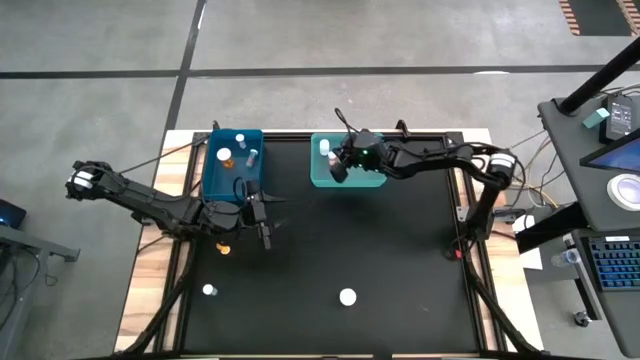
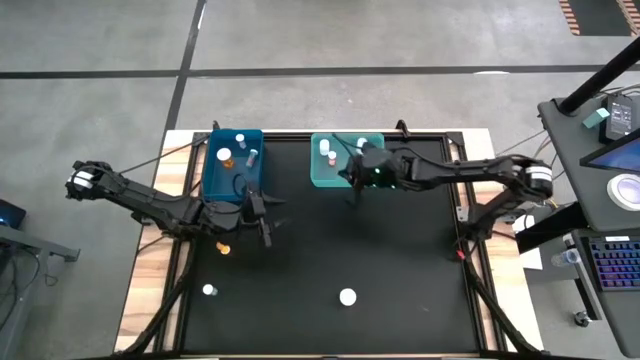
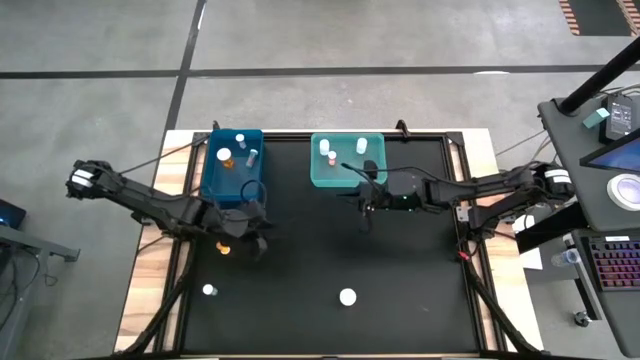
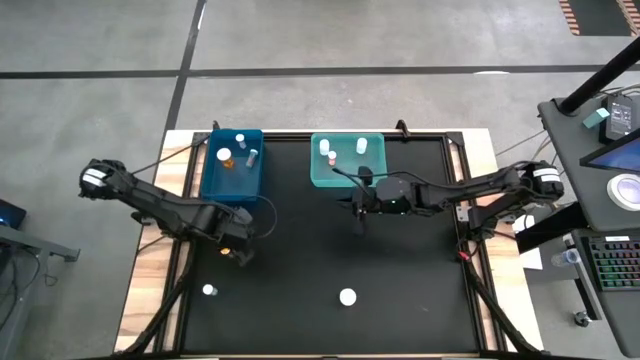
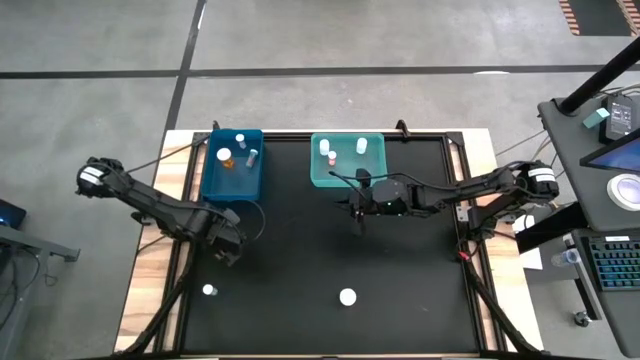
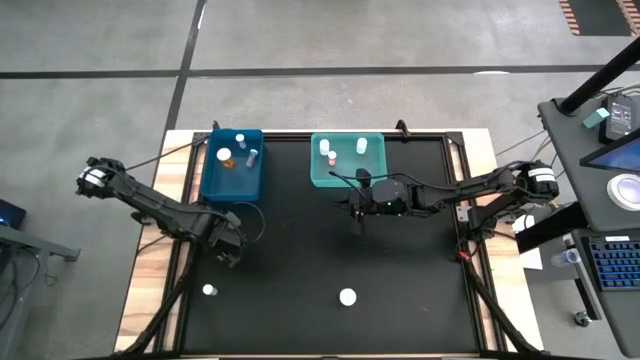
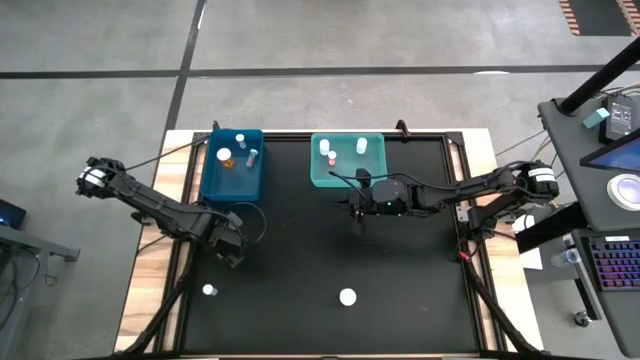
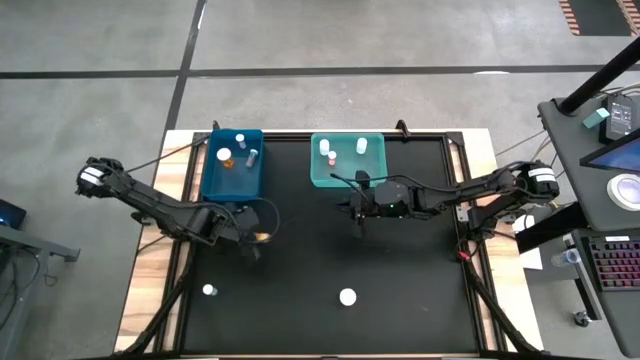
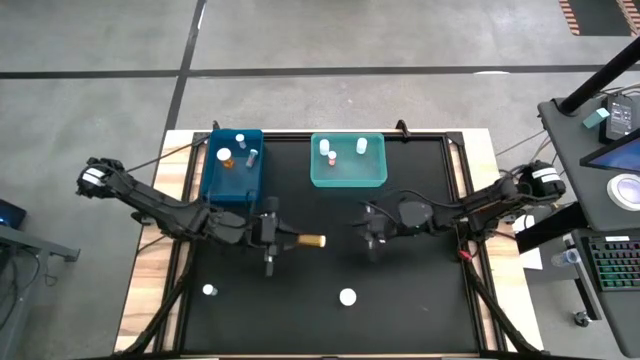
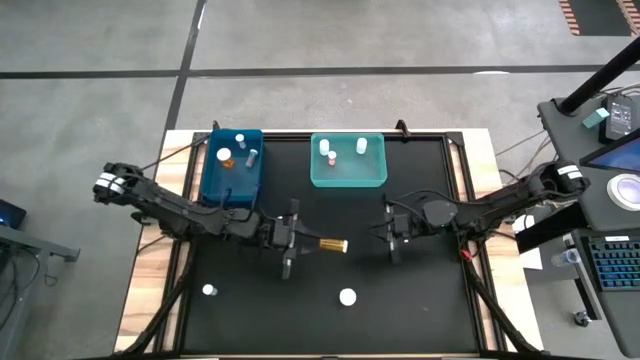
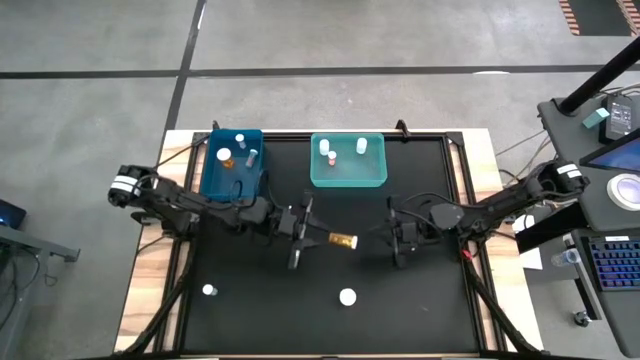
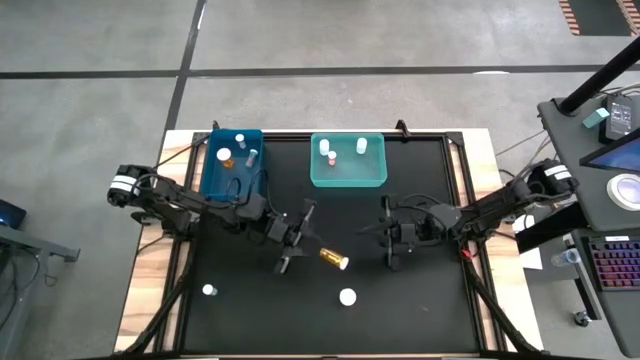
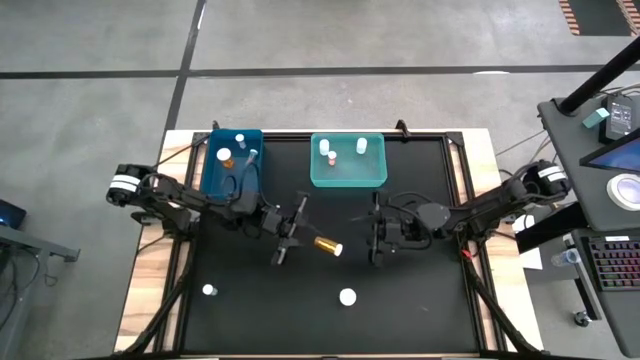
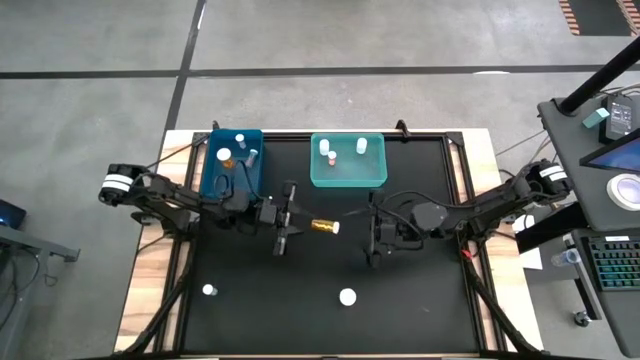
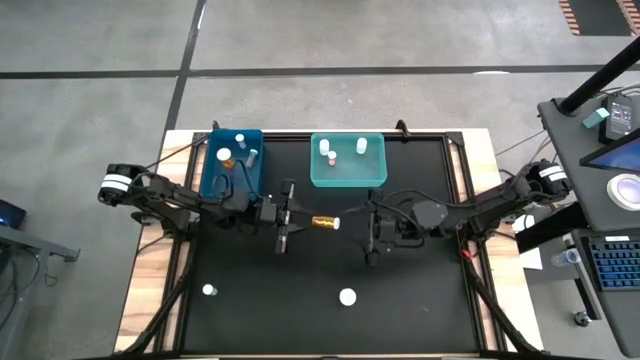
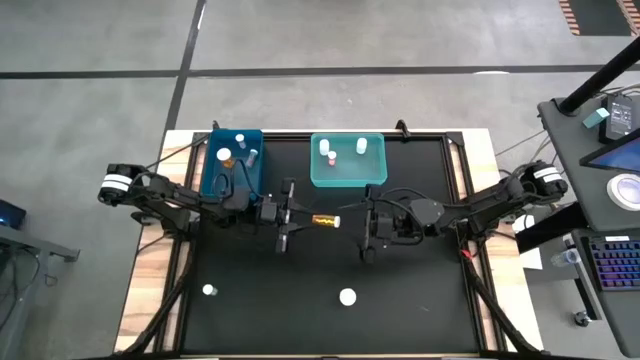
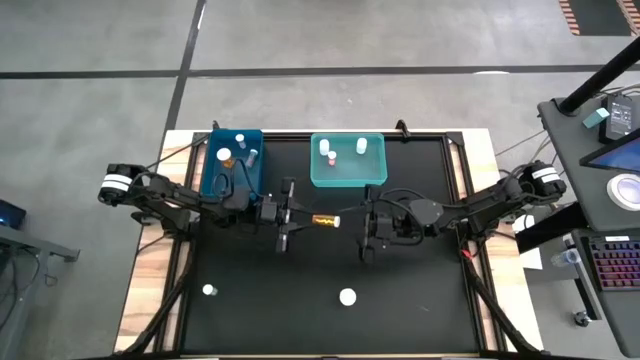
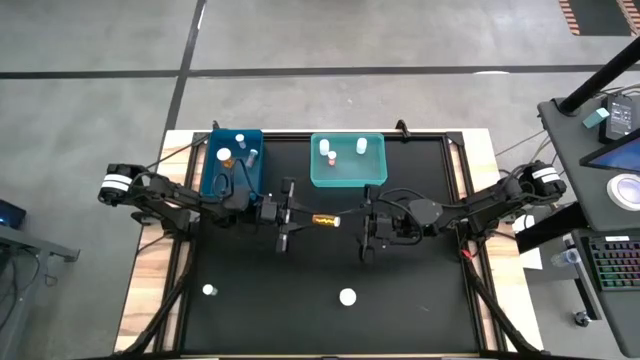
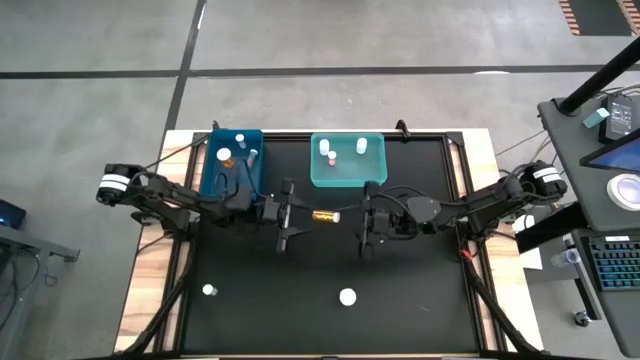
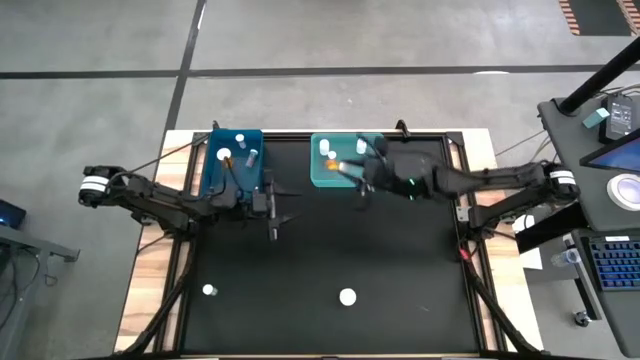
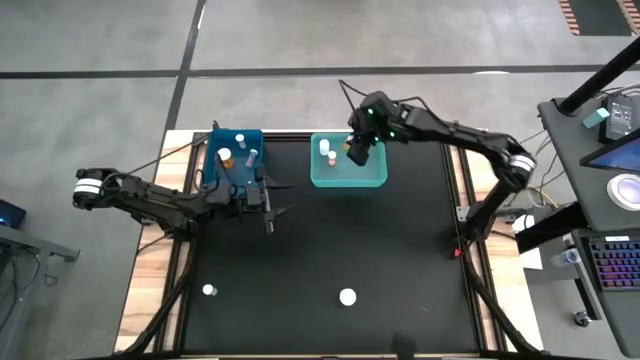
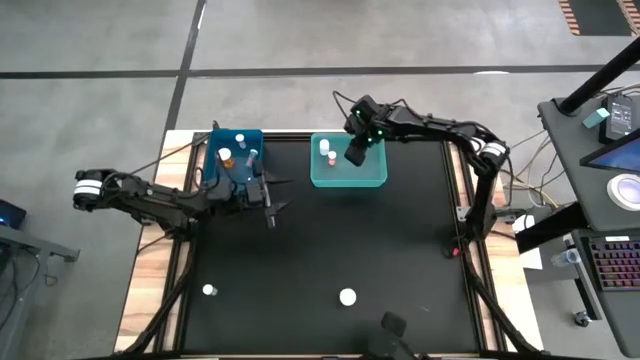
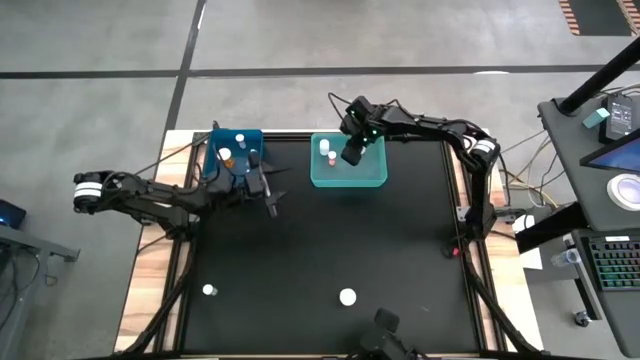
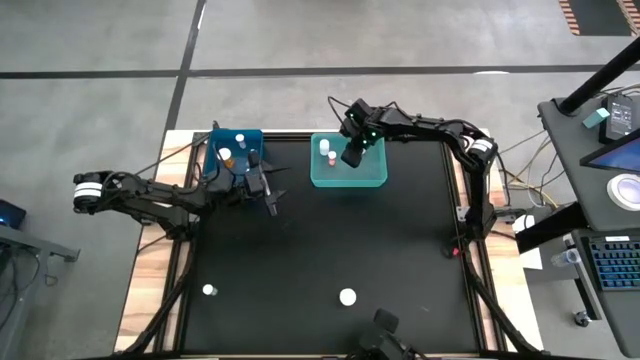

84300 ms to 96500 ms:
Task: Pick and place medicine bottles into bin by pill shape (circle, oval)
Put the orange tablet bottle into the light blue bin
